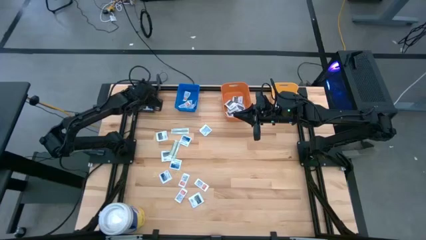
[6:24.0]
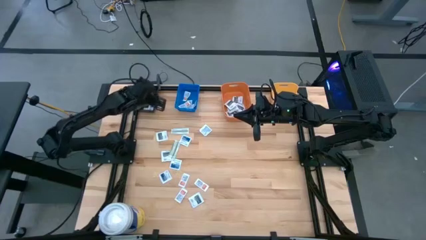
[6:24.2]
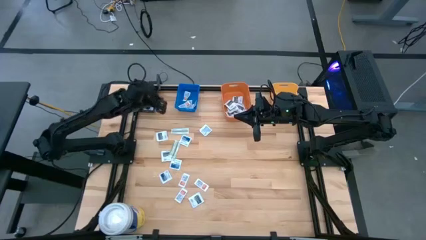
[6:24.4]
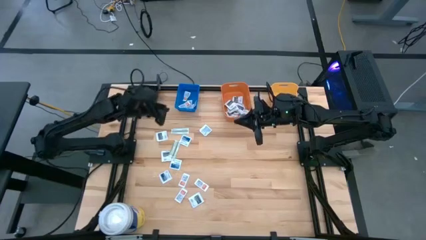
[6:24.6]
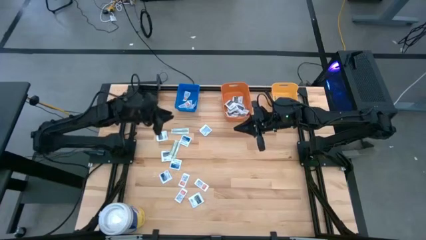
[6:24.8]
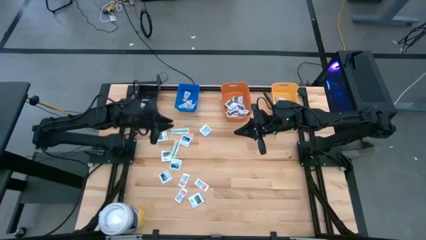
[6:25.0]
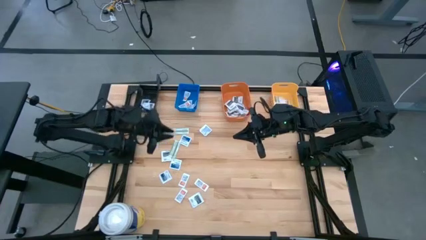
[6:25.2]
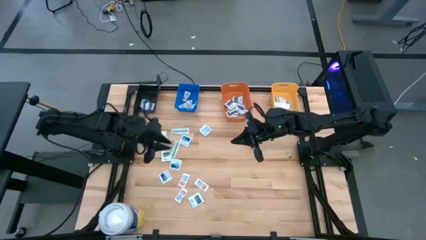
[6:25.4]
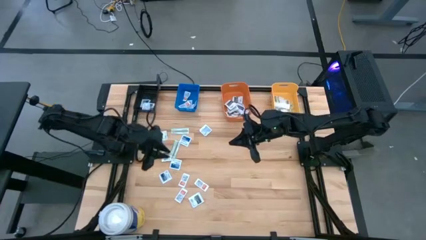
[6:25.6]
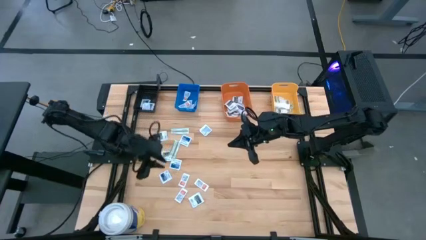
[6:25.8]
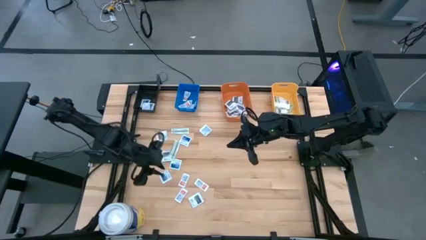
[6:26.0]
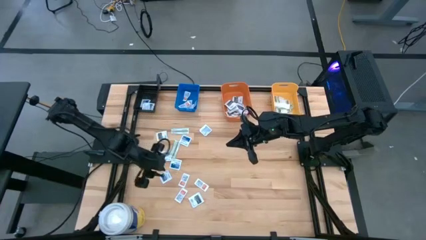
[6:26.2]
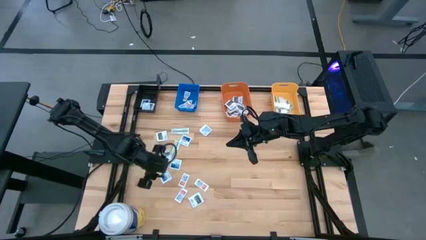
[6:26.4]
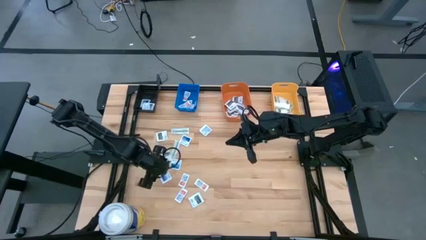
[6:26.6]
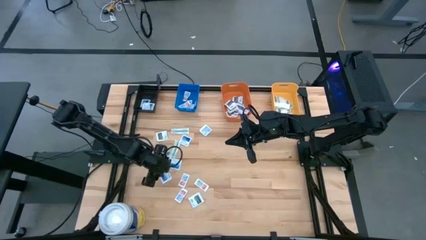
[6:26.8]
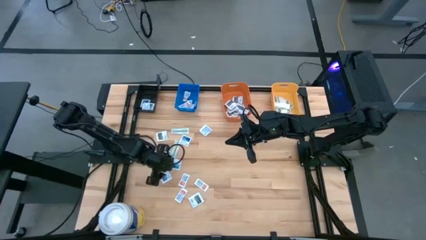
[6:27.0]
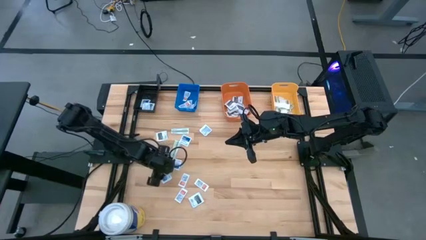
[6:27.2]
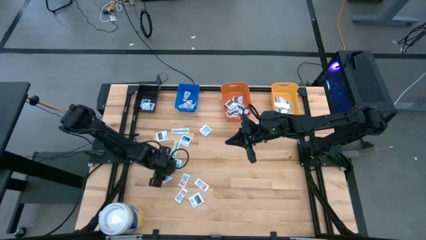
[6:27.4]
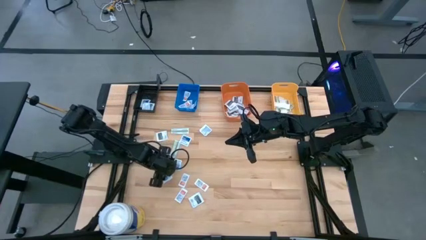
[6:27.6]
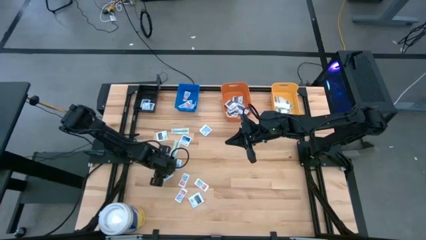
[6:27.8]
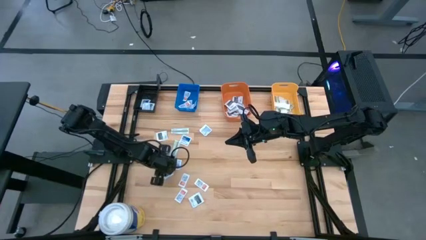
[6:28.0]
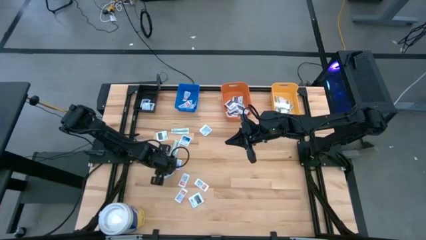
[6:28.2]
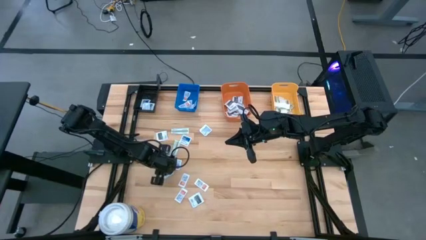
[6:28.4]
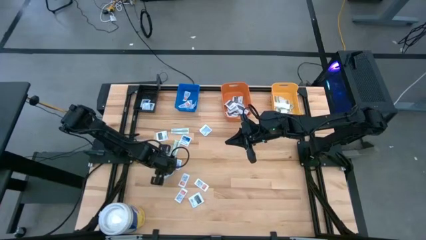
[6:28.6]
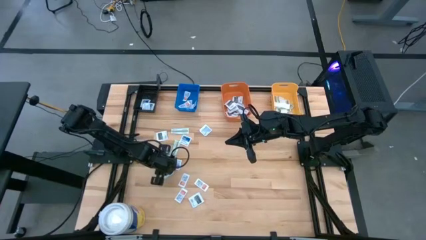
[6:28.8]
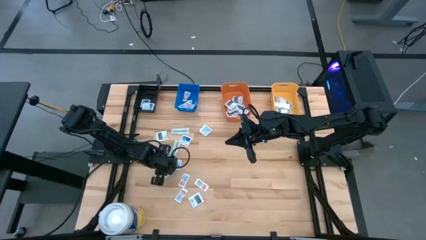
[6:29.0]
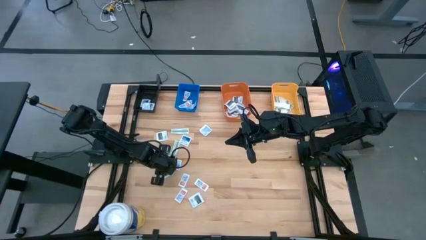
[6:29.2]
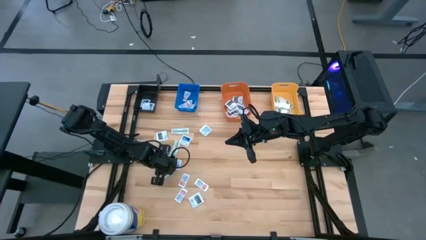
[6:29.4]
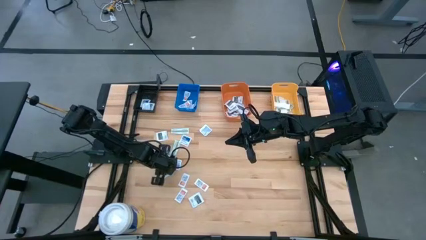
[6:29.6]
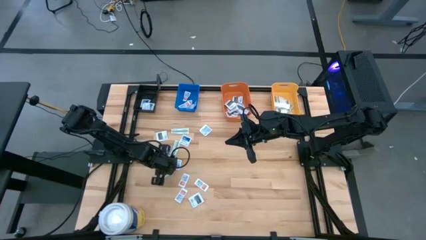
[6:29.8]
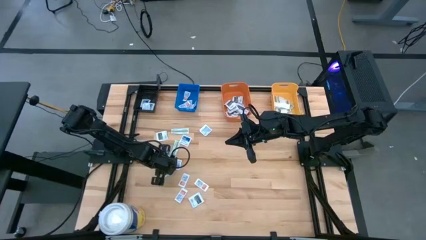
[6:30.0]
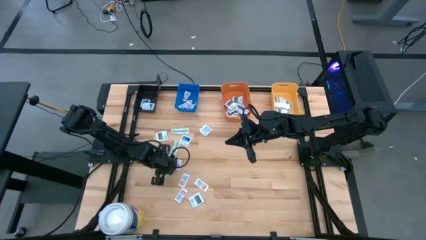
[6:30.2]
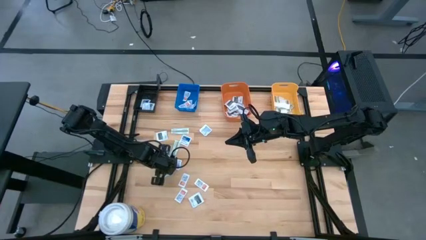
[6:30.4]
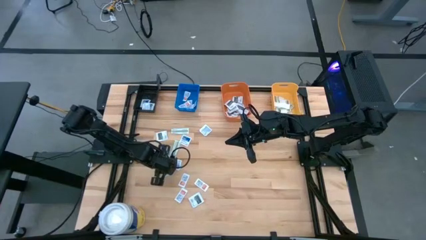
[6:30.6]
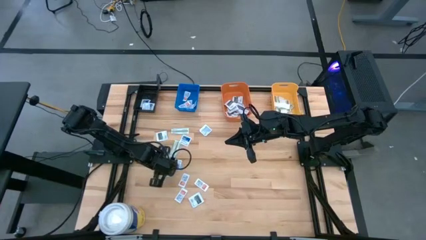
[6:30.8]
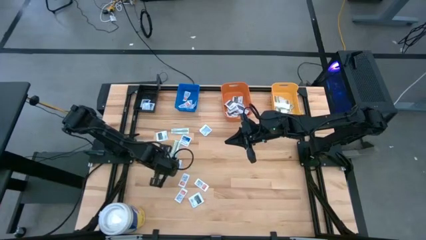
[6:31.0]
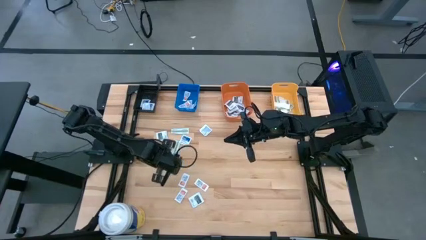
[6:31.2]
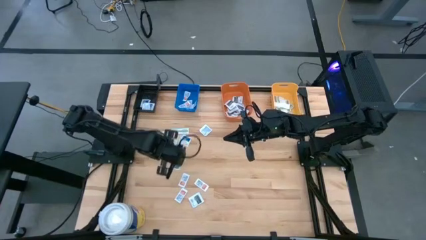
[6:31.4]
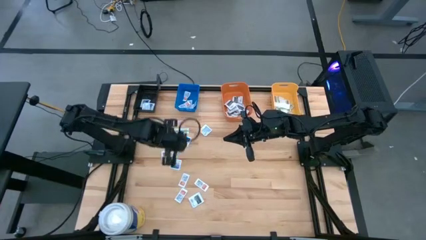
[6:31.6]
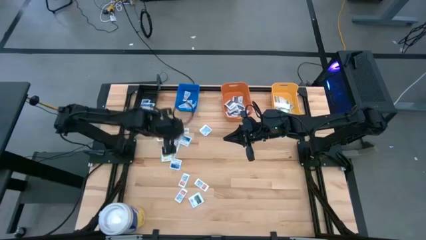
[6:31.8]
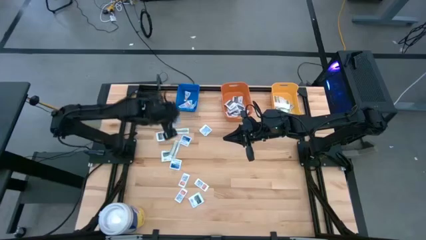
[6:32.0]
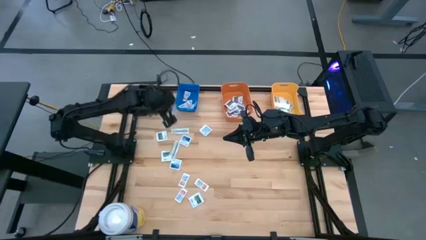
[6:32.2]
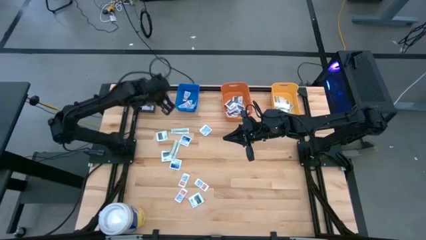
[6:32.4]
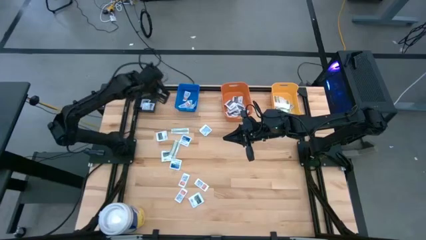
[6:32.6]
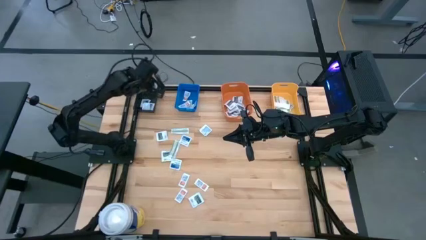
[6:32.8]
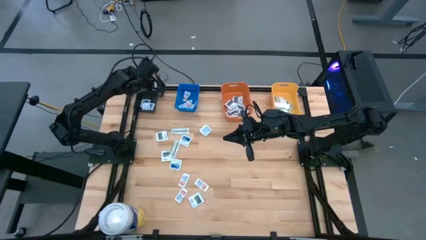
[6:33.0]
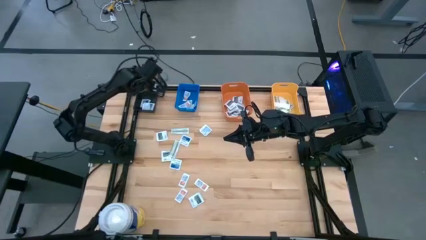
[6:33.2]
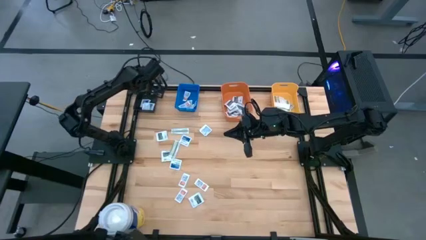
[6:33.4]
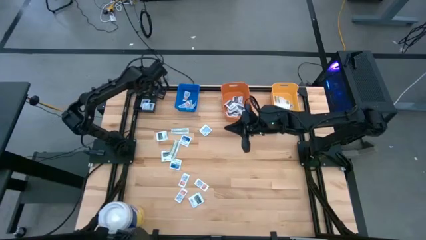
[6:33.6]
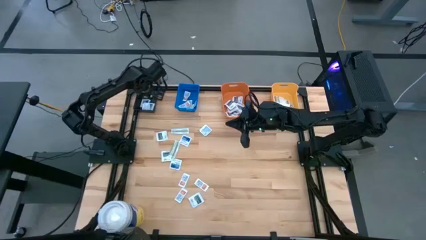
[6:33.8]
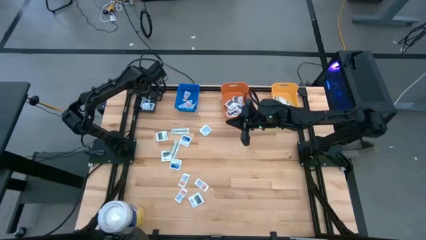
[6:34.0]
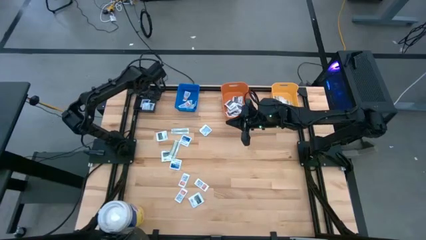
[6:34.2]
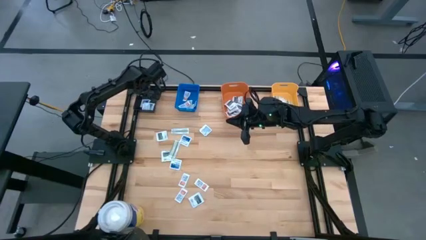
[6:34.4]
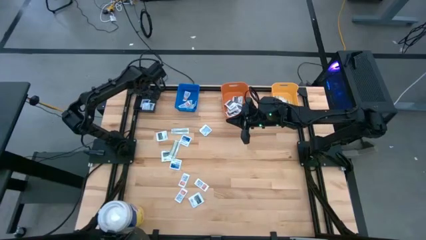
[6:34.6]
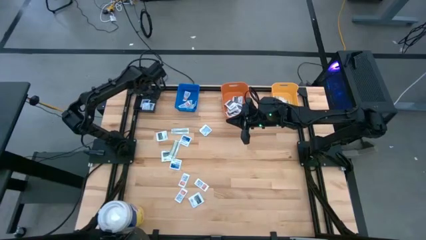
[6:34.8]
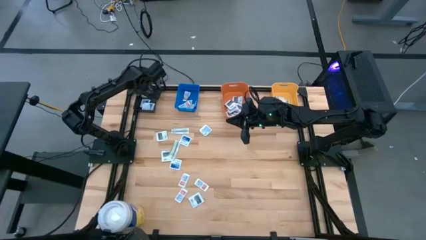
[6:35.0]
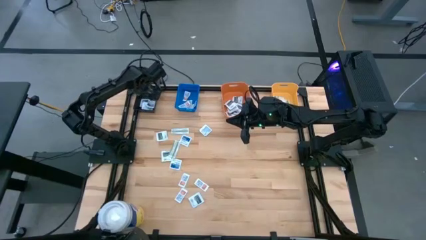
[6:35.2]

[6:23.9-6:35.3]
Task: Pick & Place First Aid Supplies
Put the alcohol pad into the black bin

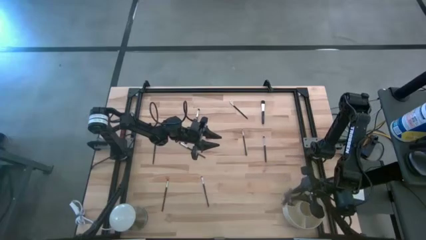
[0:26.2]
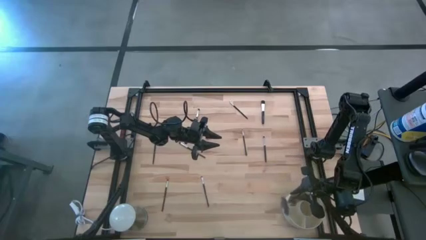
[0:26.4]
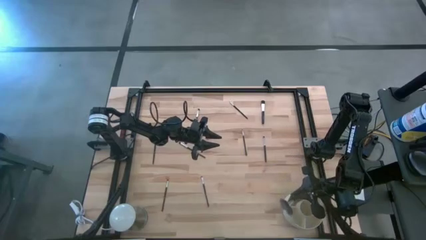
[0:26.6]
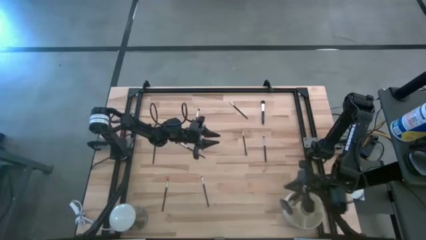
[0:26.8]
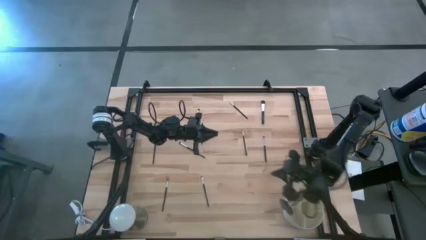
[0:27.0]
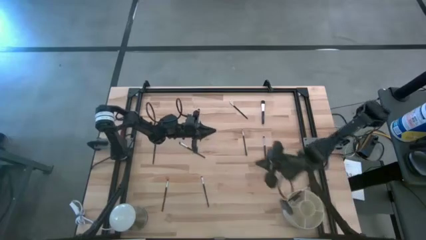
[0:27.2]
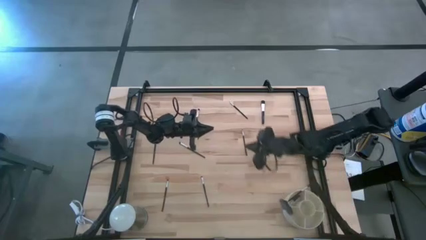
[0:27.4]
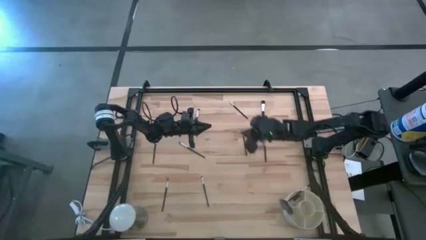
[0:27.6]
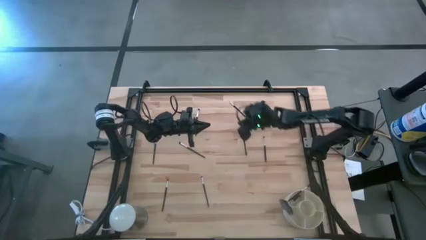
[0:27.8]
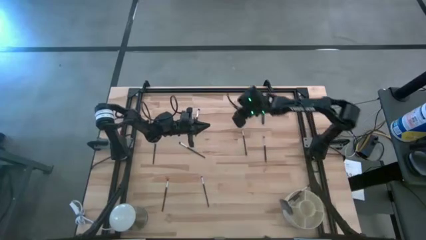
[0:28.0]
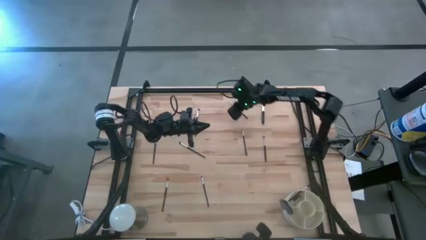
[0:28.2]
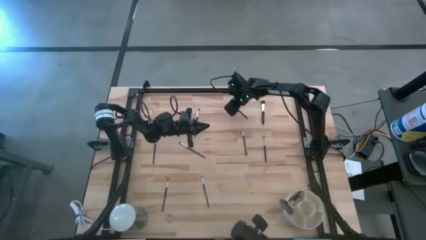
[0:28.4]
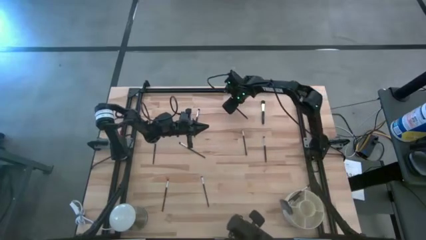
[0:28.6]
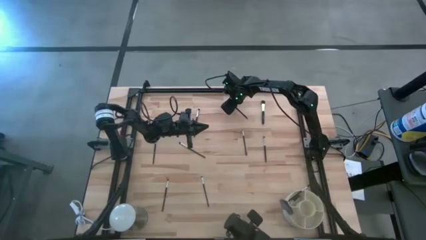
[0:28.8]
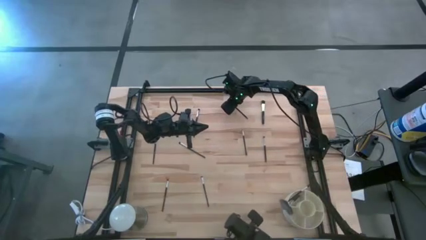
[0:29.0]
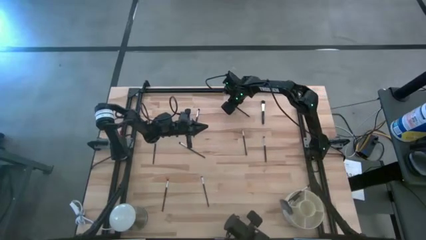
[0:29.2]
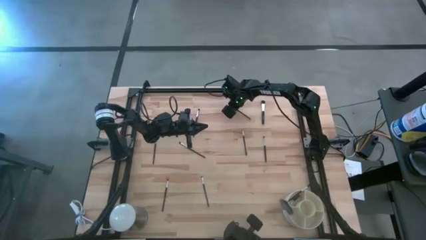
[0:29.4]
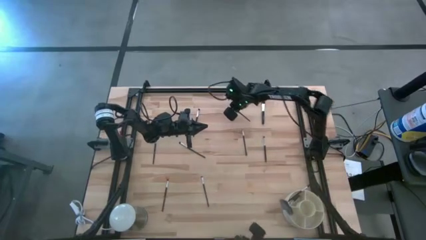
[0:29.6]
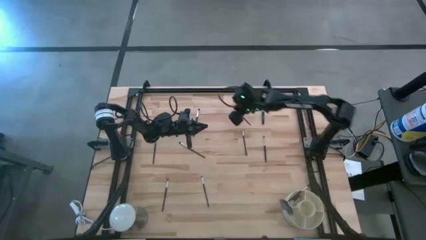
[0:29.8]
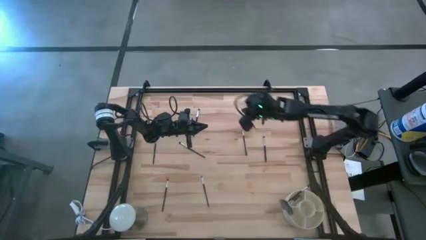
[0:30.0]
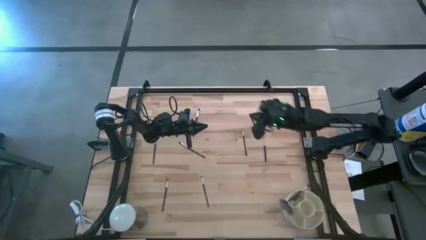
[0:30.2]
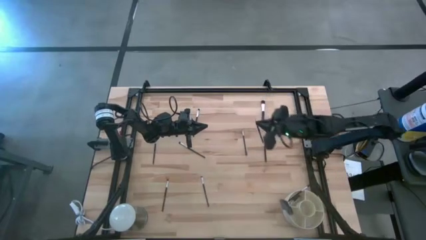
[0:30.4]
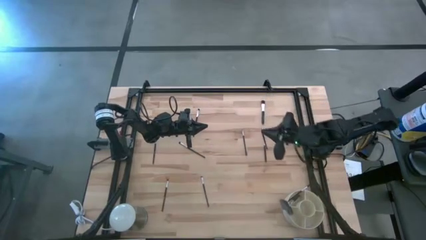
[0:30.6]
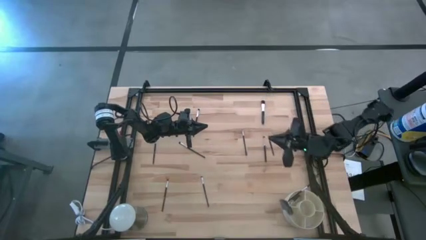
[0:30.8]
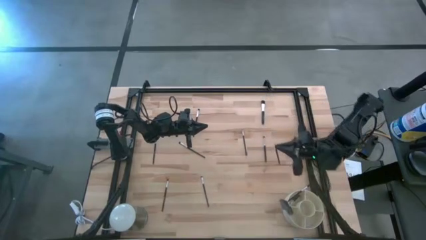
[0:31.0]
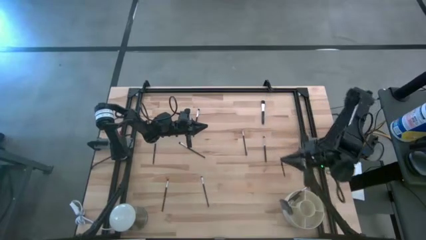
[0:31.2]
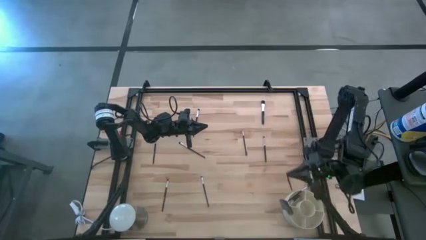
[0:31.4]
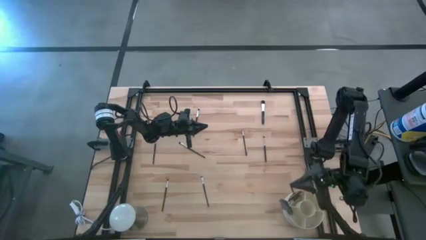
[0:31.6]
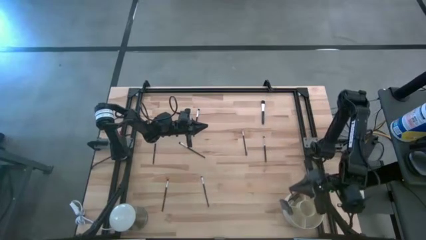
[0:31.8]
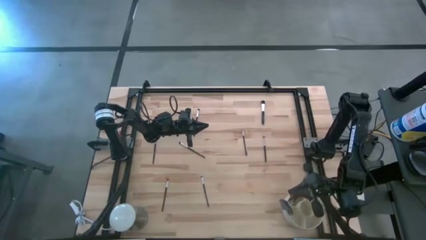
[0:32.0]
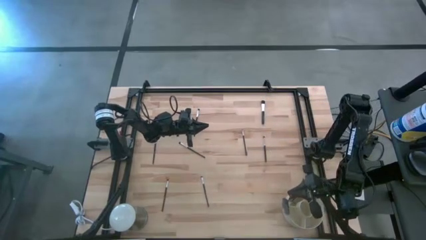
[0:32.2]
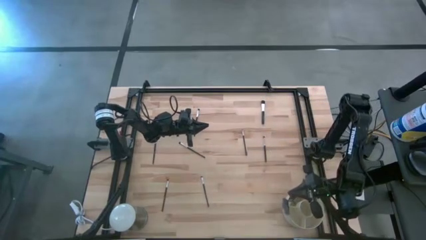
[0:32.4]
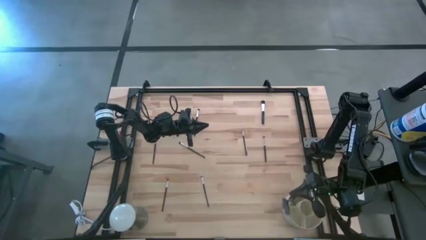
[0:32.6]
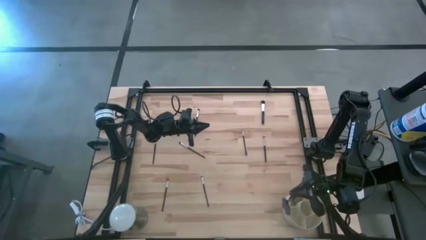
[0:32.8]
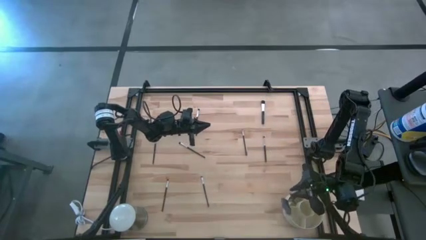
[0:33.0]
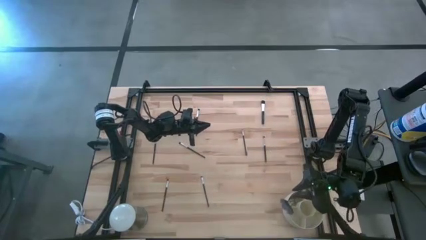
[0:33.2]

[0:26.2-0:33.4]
Task: Put items in baskets/containers
Put the black liner brush into the white organizer
